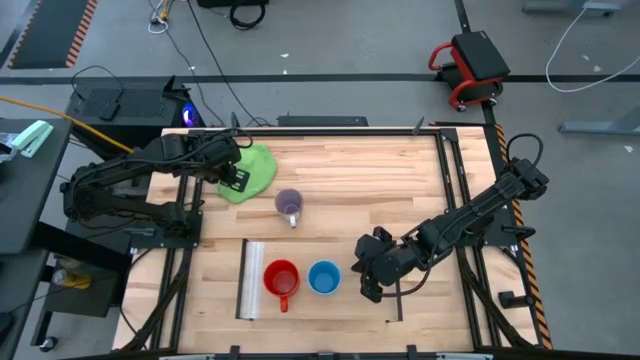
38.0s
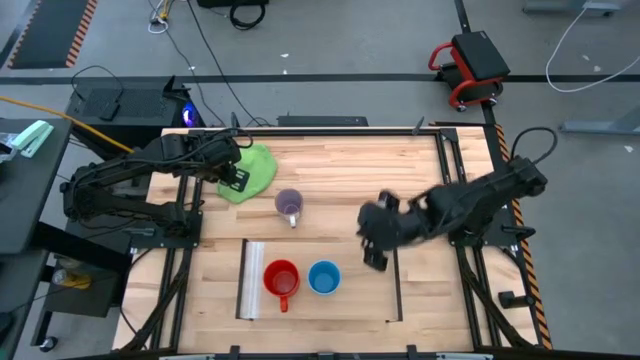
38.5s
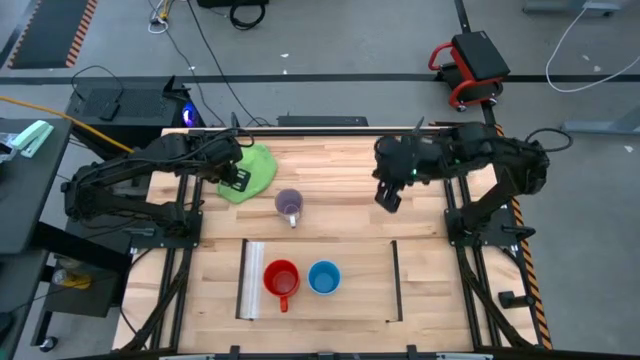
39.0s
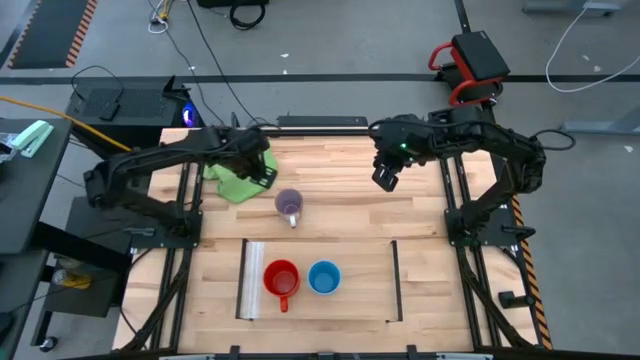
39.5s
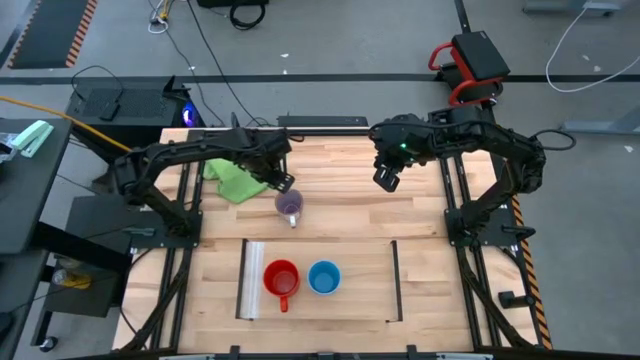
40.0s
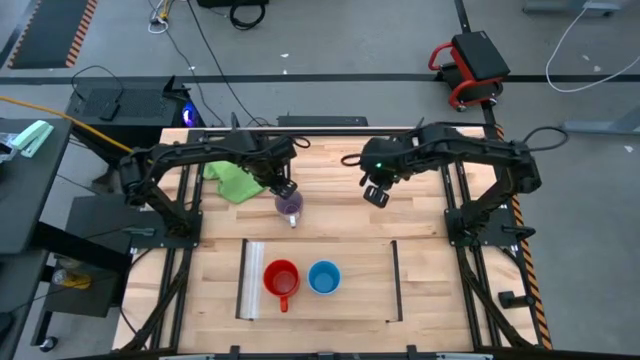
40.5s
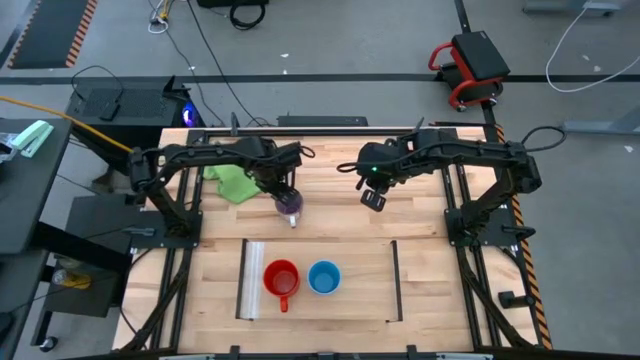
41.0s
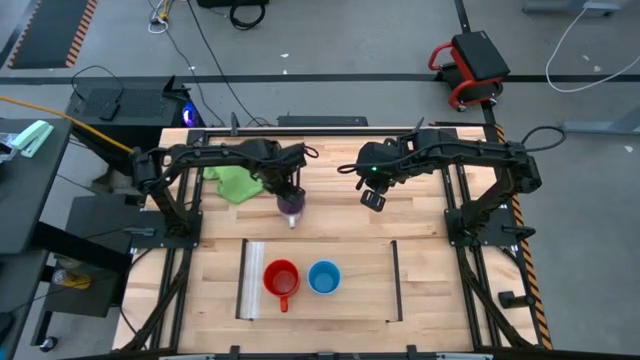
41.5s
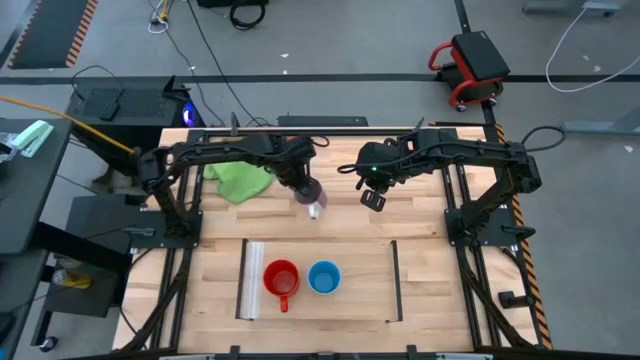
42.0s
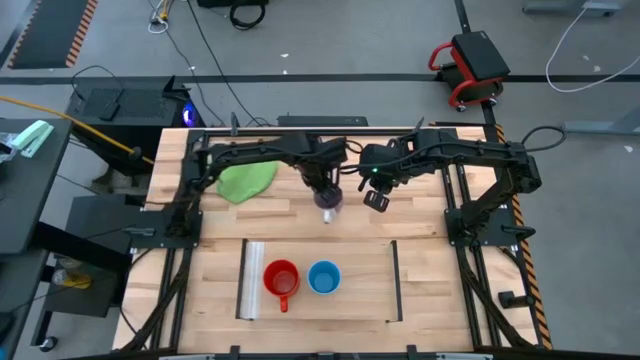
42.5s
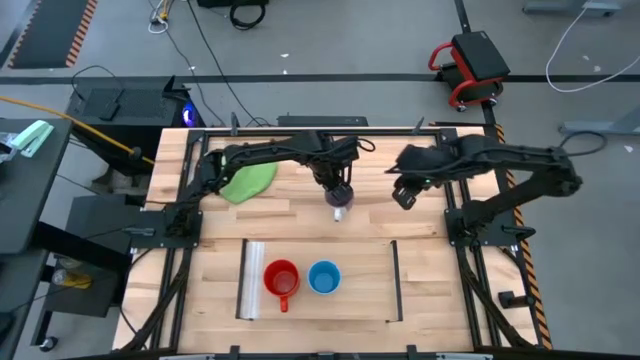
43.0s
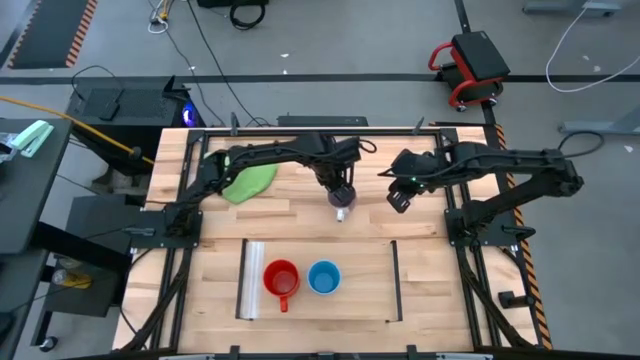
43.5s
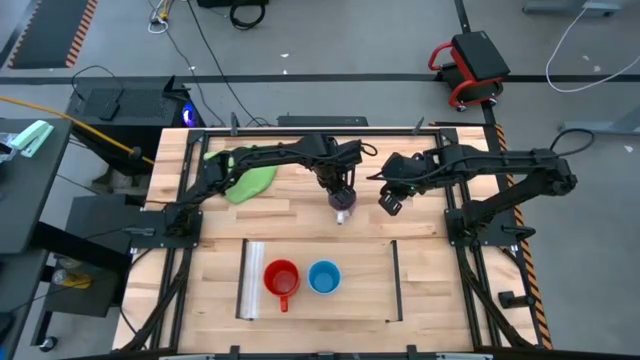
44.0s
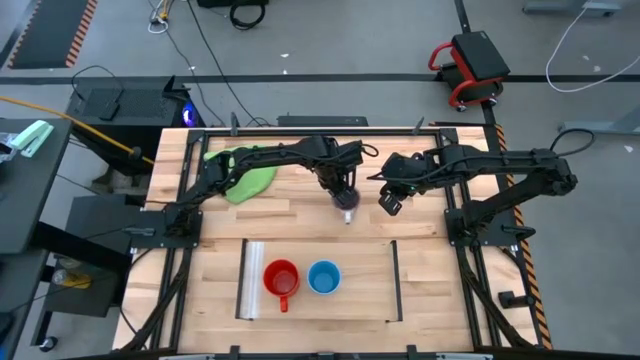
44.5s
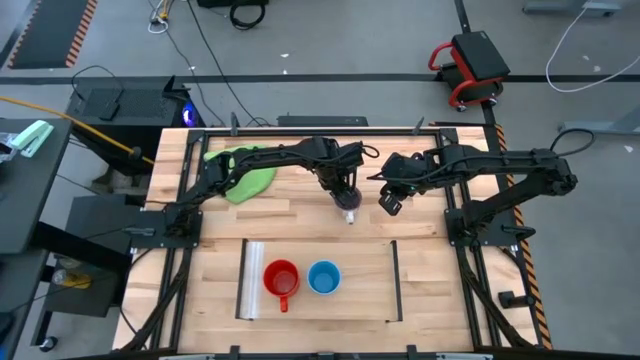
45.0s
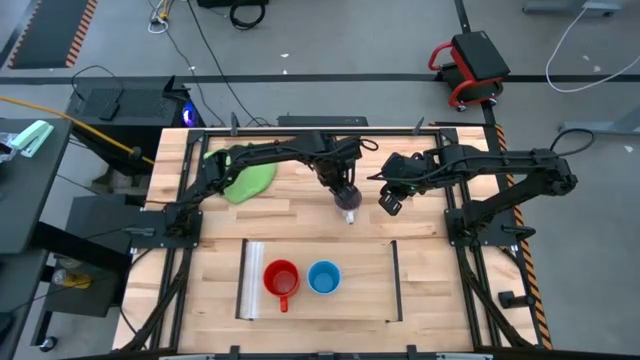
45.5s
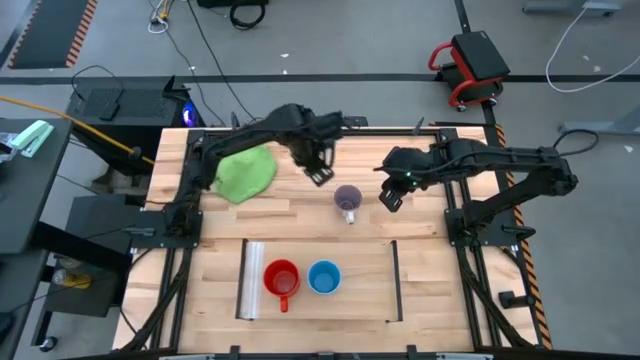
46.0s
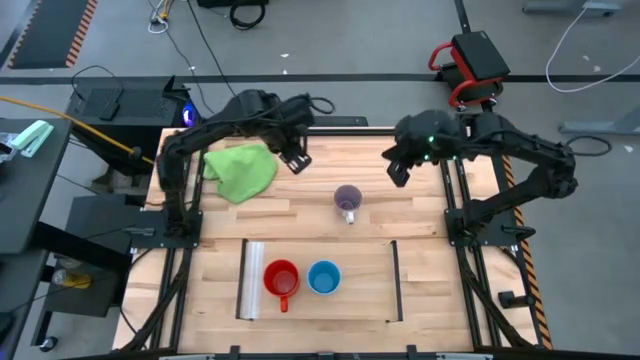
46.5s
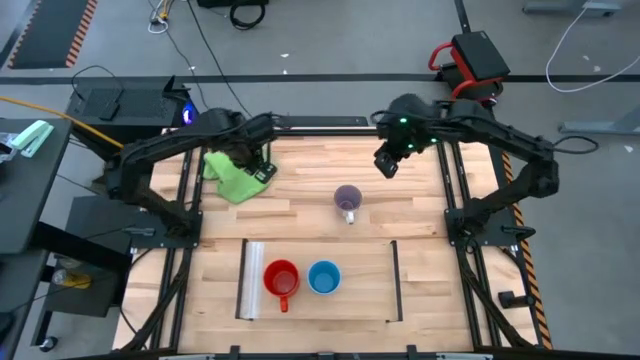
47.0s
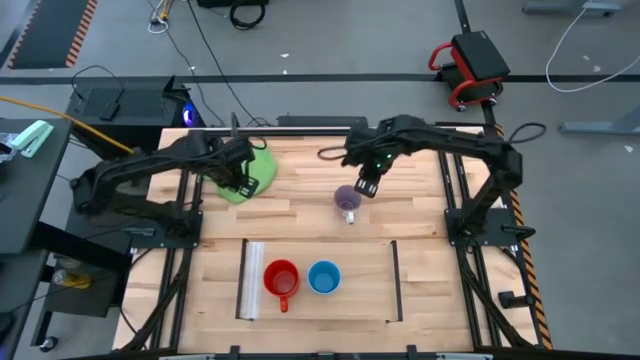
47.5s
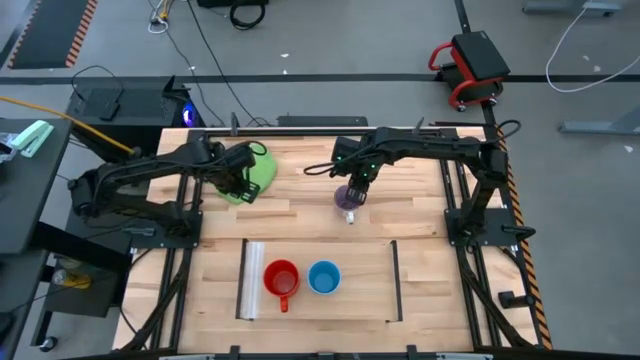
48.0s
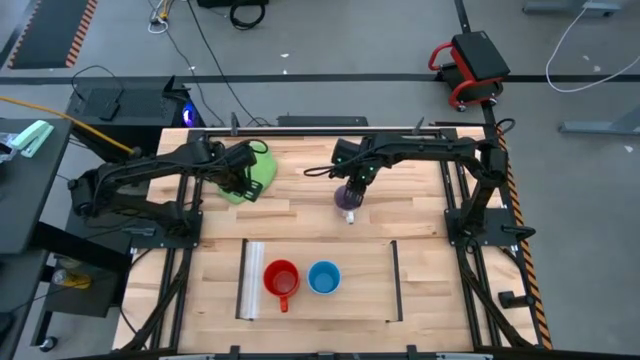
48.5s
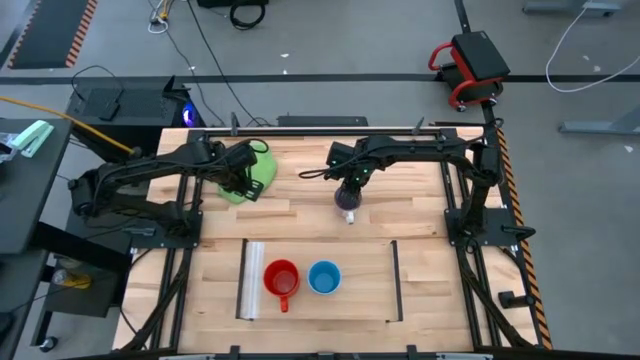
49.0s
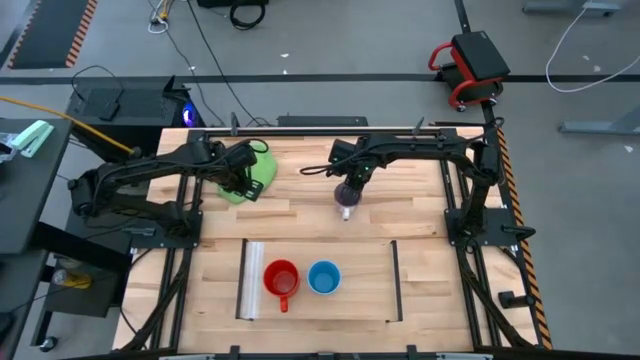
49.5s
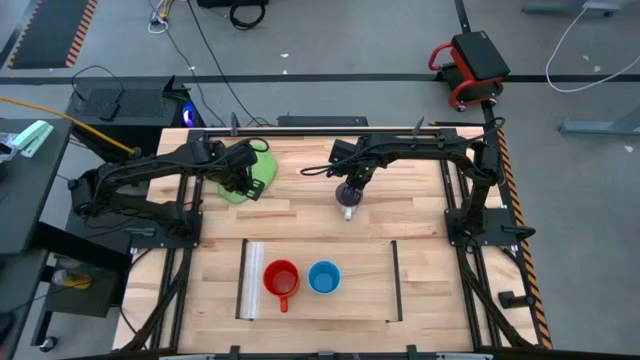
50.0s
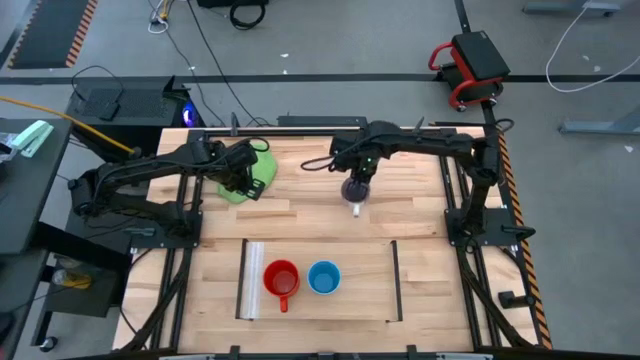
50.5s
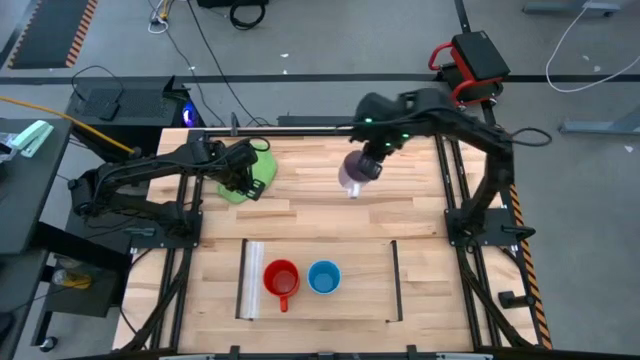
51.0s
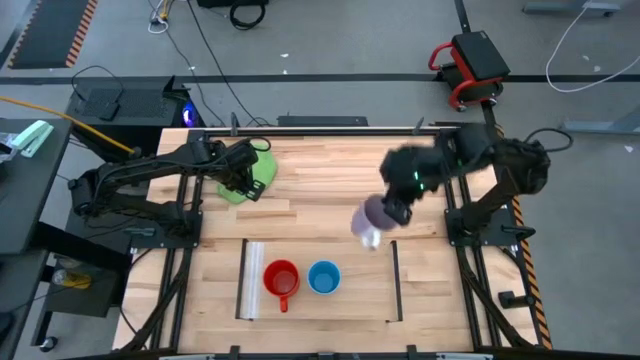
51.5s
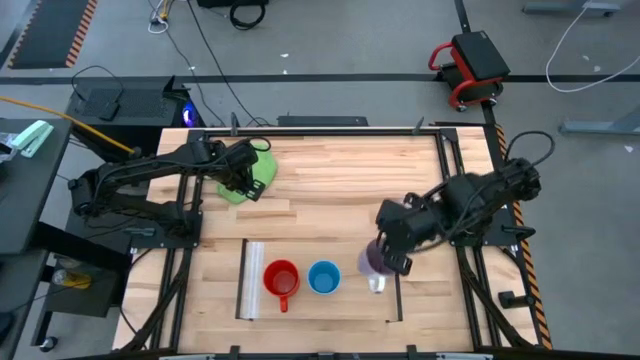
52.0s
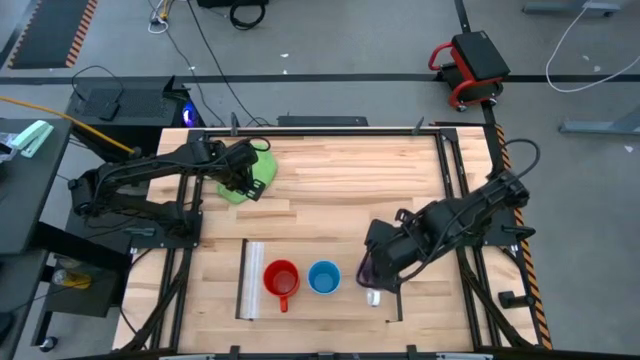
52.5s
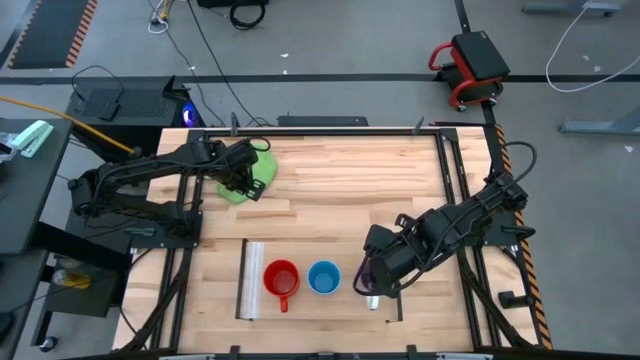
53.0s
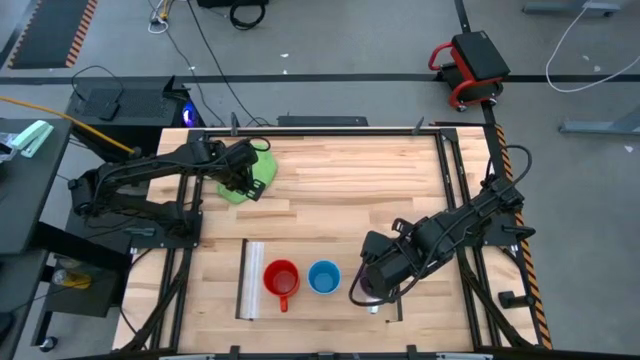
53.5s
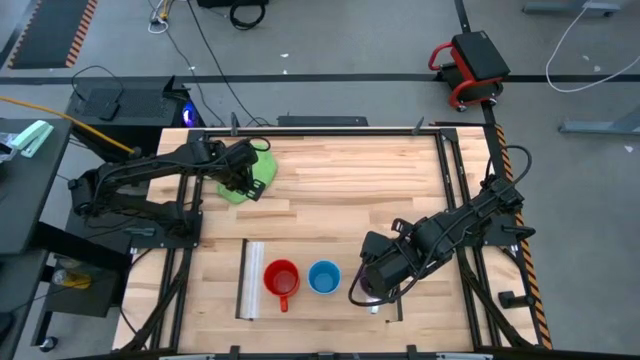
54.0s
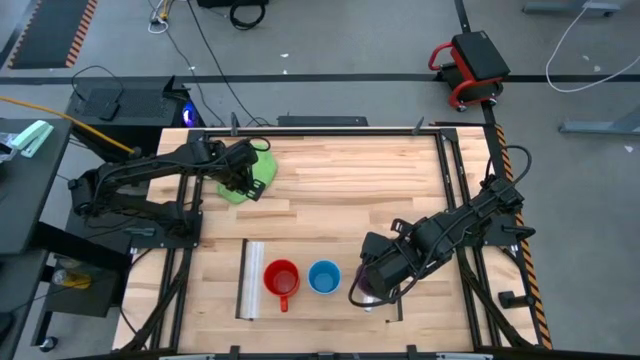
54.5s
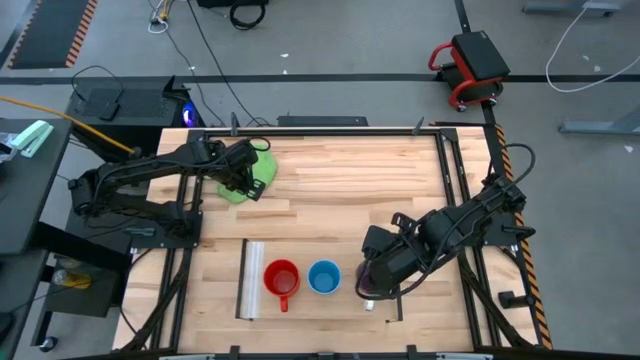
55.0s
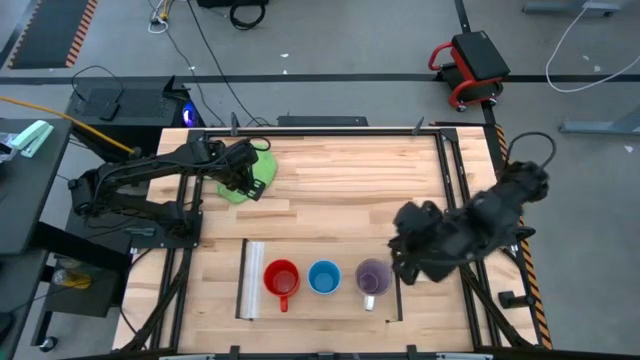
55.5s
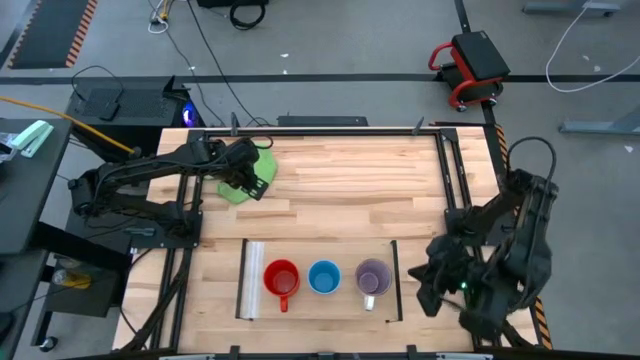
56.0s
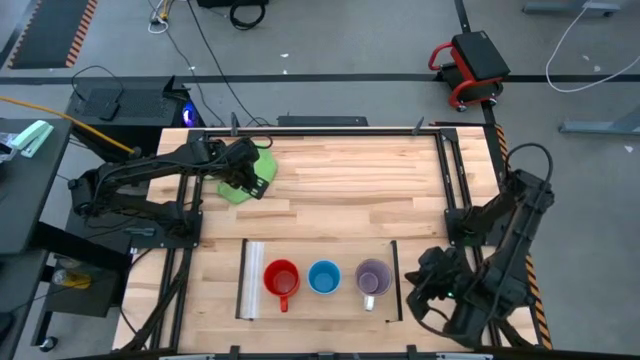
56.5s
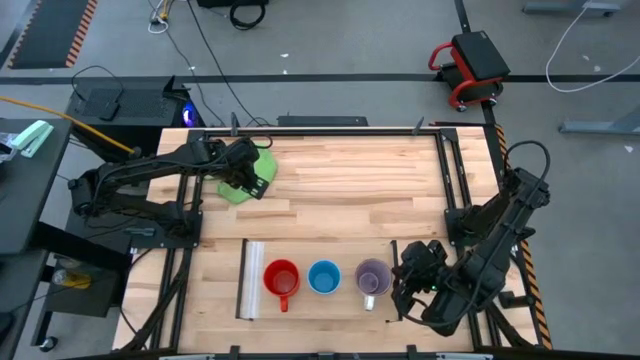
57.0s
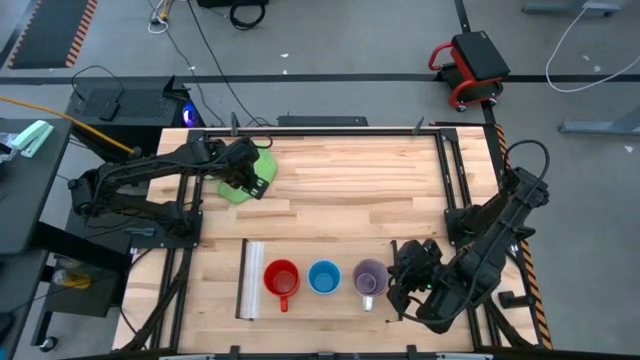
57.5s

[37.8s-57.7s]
Task: Stack small to large cups/mugs on shelf
Put the purple mug on the shelf
